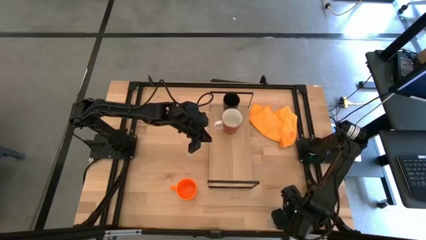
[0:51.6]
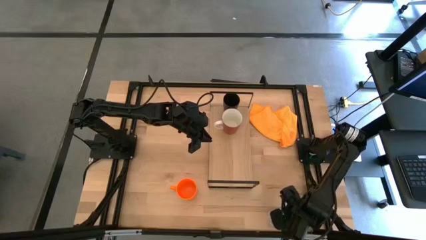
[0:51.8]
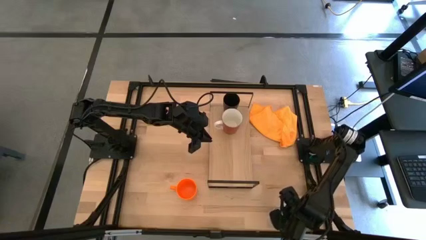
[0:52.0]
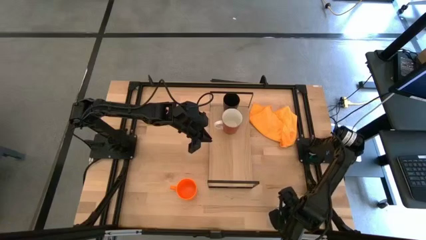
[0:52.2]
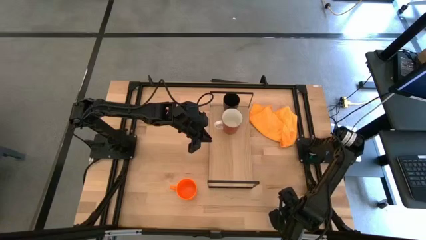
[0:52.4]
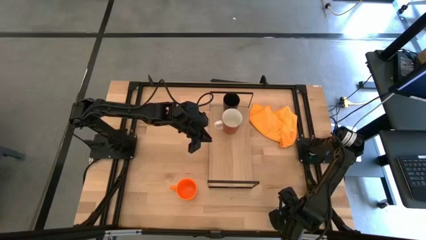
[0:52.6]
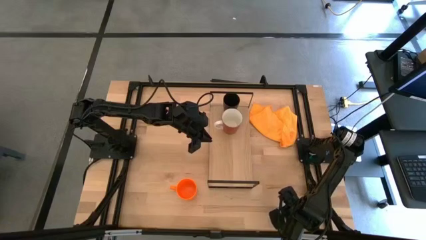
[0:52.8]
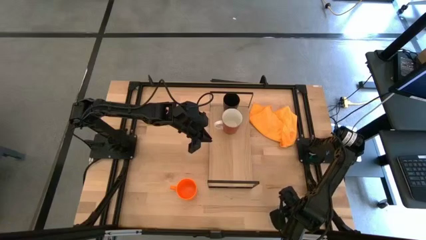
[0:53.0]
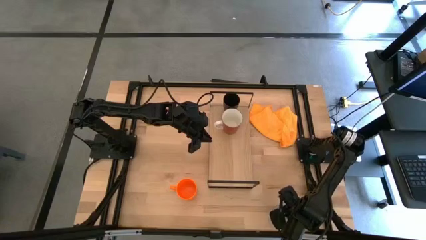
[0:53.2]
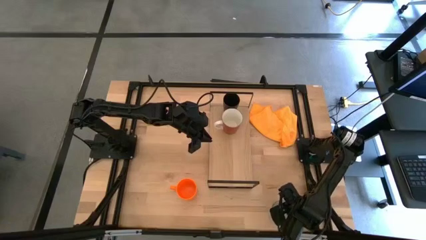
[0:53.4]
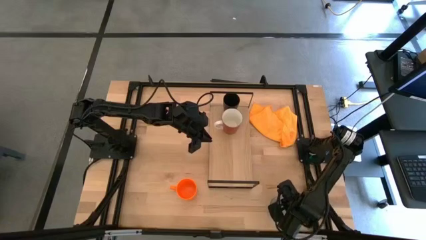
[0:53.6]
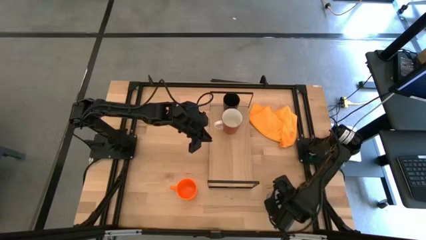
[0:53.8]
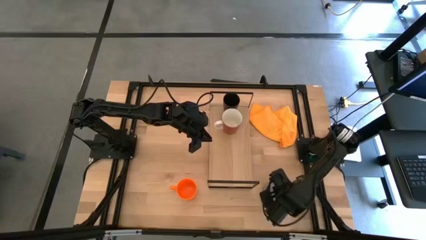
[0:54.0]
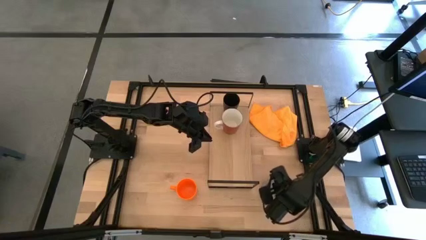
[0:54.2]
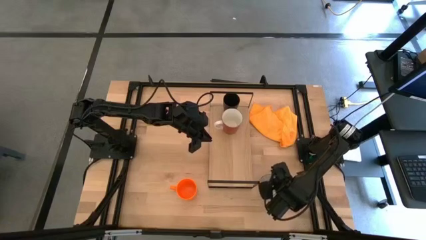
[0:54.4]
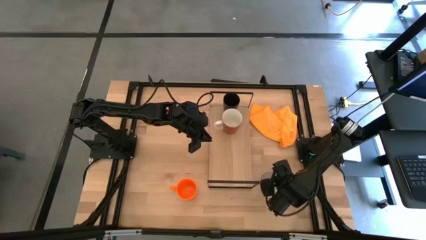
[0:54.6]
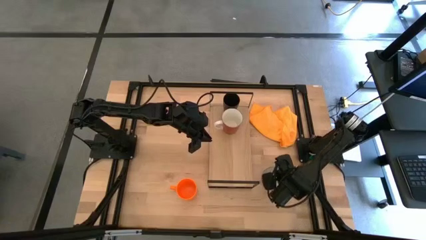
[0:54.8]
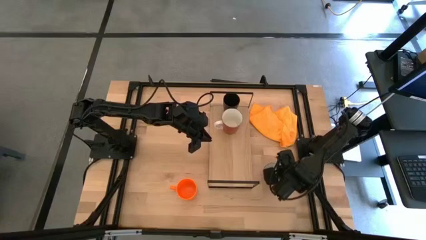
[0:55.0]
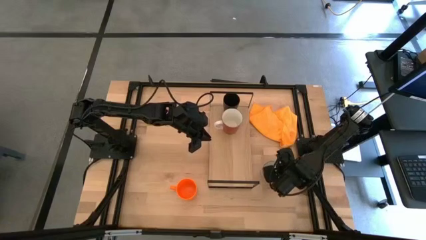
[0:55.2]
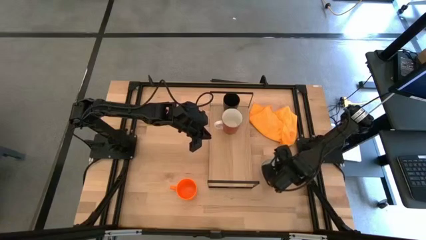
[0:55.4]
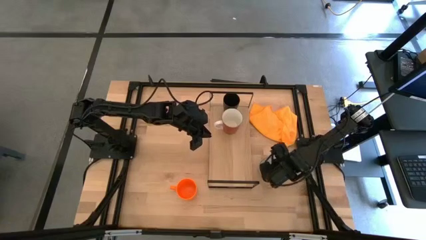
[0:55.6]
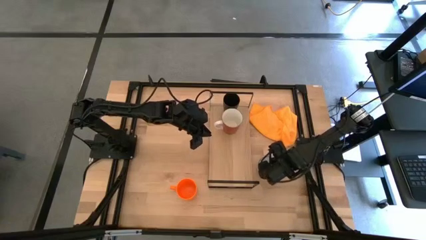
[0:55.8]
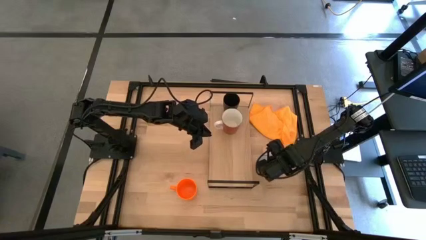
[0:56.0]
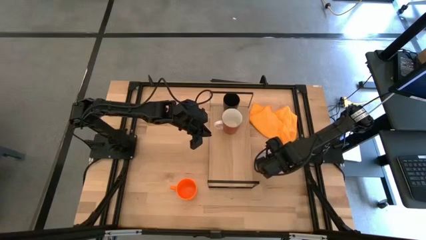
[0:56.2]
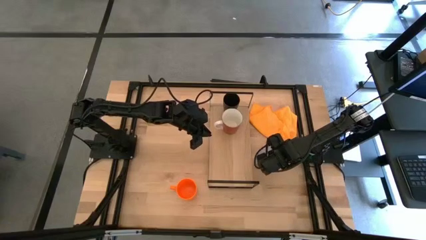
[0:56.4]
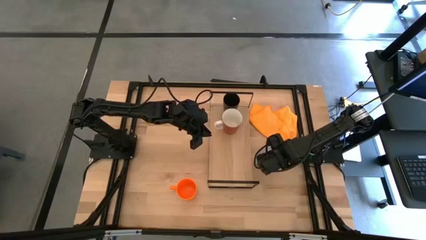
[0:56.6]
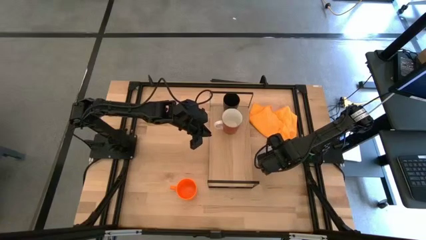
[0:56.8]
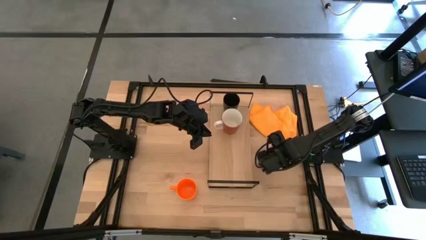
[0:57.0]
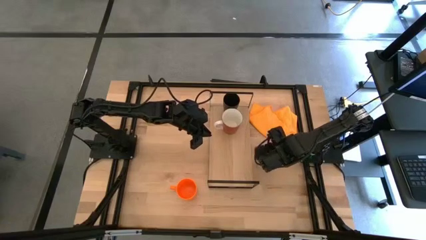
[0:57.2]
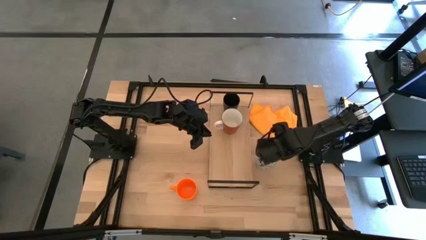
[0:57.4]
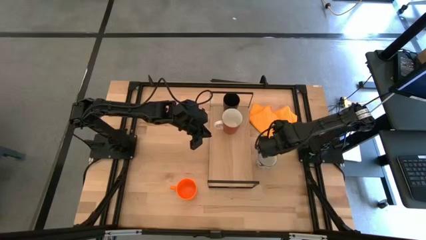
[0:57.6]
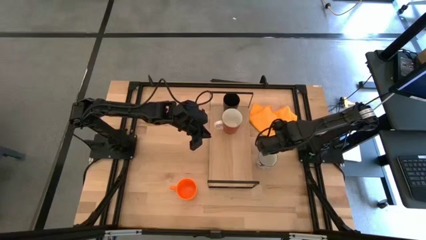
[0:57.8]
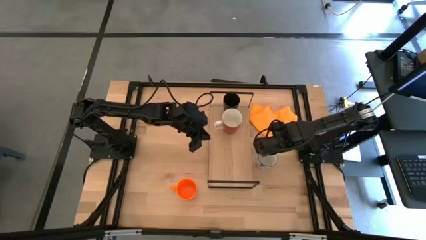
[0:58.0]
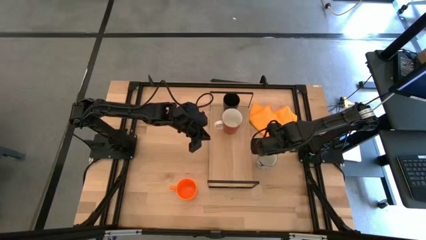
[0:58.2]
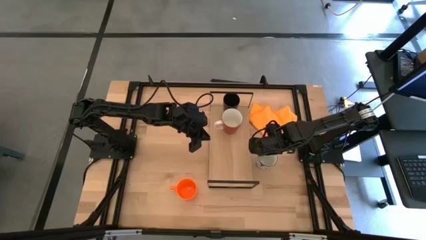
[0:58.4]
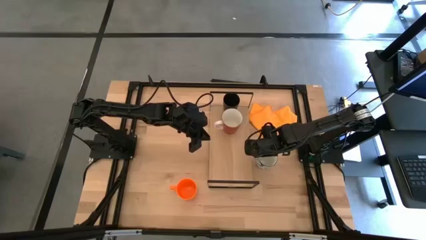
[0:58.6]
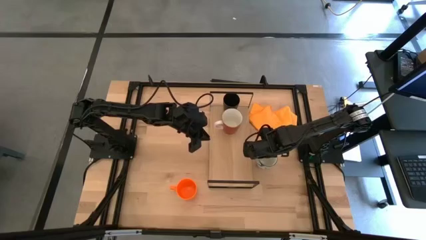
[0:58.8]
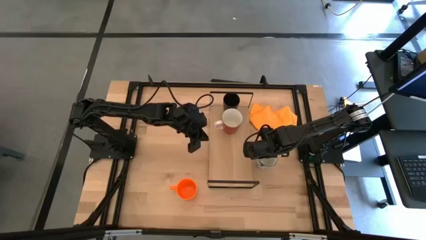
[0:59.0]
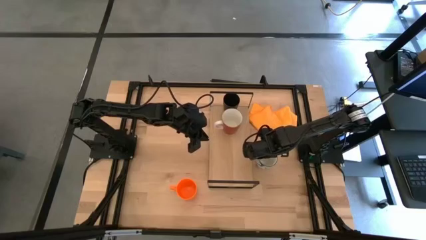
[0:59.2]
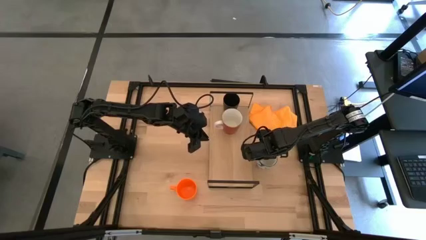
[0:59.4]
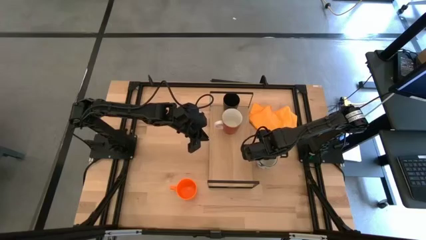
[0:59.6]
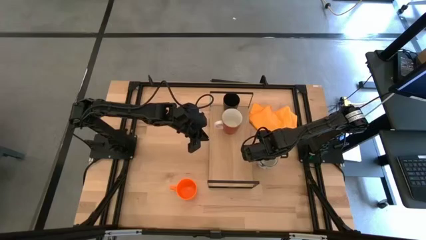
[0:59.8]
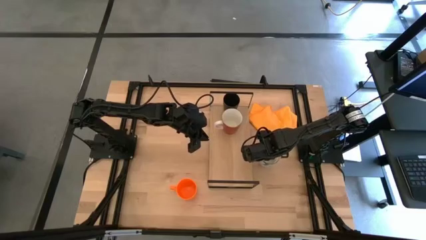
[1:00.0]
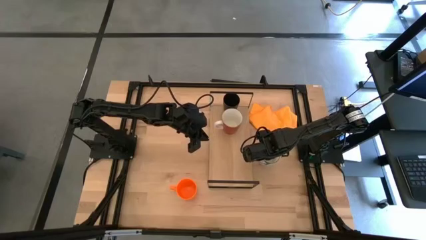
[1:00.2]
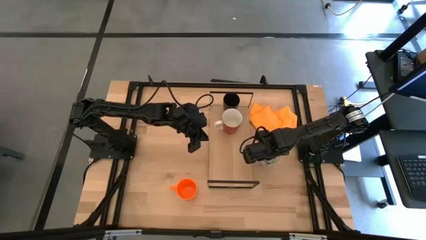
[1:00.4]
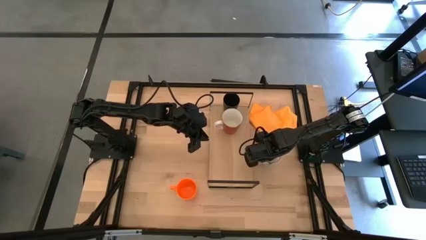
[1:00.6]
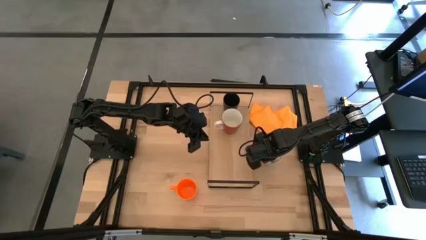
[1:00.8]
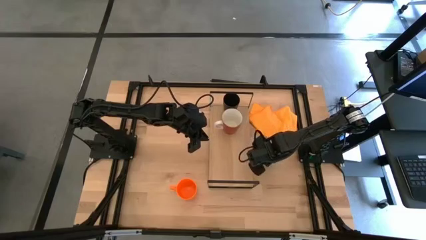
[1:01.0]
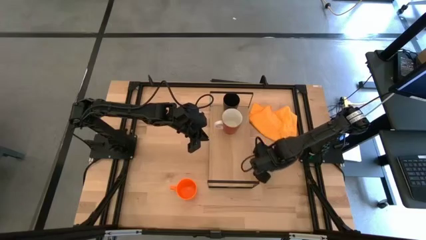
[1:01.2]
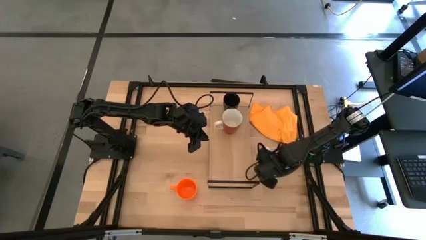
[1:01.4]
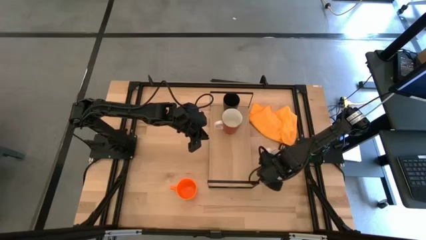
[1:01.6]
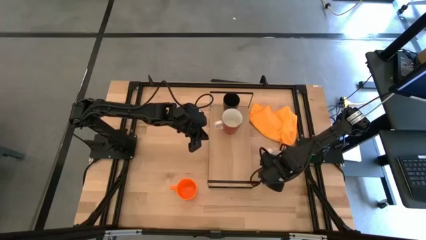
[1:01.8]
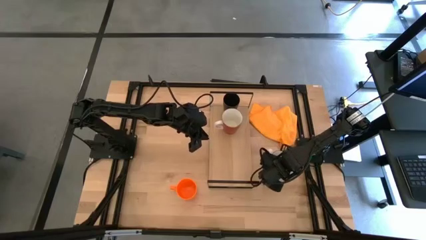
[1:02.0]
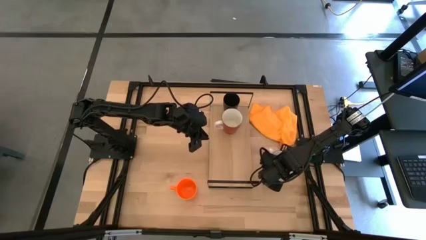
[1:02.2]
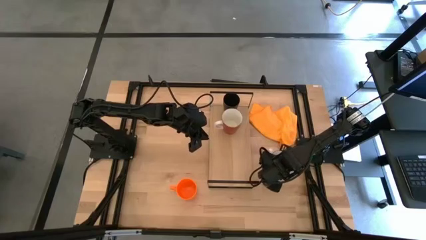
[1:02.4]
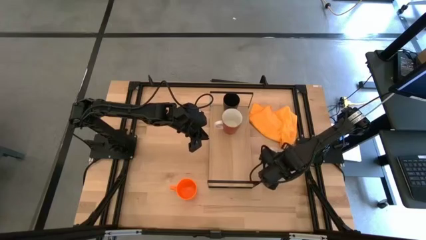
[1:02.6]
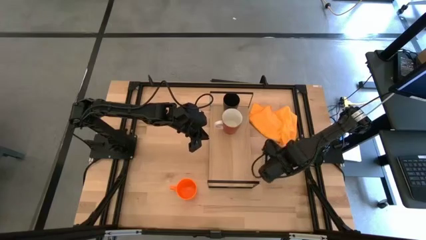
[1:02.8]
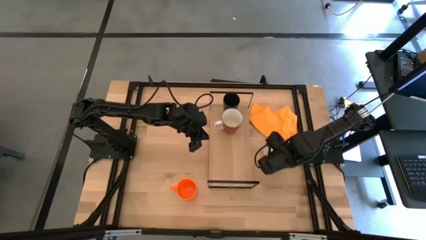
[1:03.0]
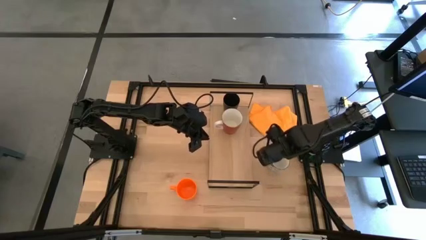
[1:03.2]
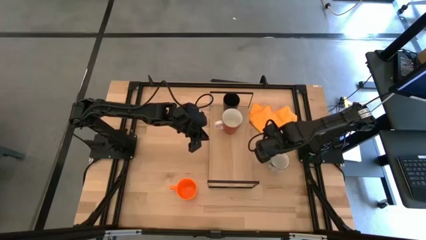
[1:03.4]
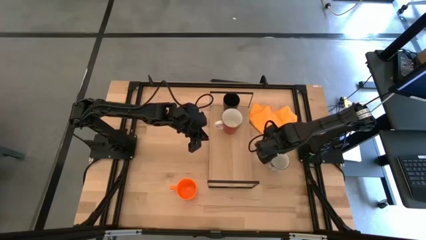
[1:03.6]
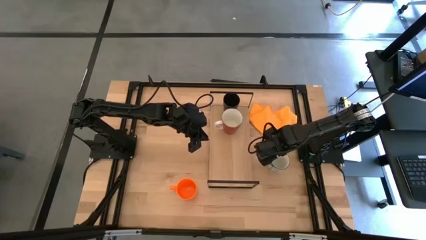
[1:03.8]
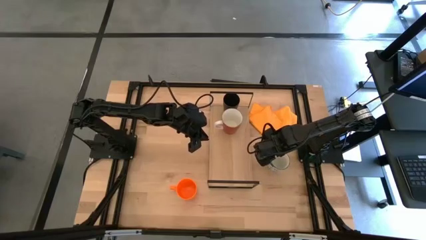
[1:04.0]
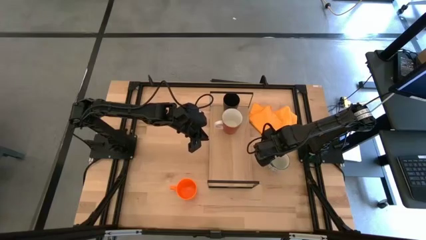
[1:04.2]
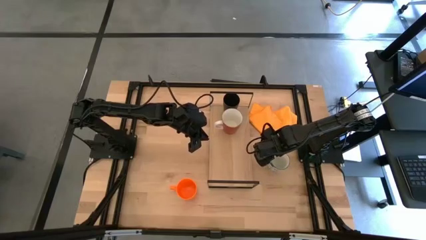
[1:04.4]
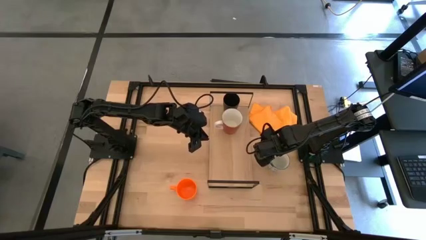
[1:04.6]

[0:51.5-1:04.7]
Task: Stack small to large cups/mugs on shelf
Put the blue pattern mug align with the red pattern cup on the shelf

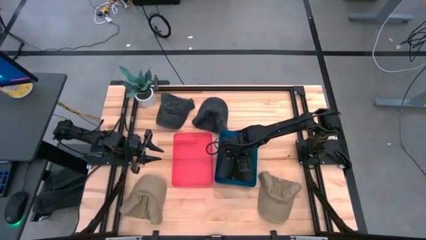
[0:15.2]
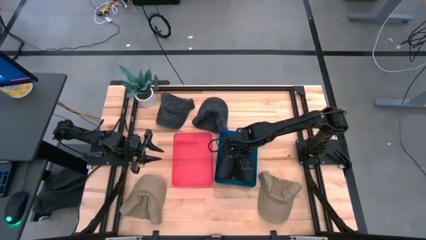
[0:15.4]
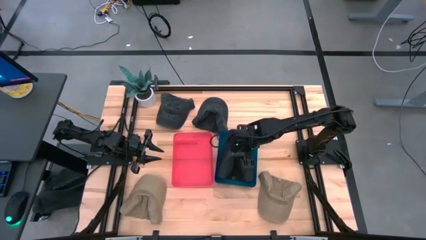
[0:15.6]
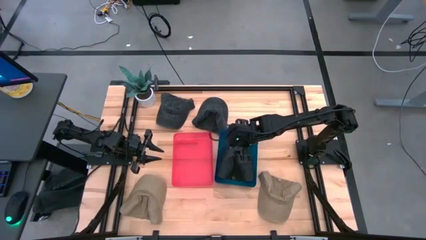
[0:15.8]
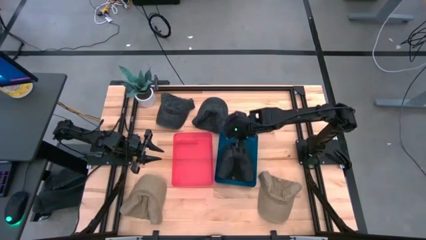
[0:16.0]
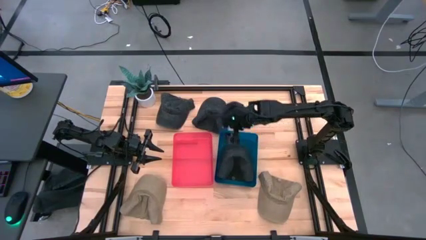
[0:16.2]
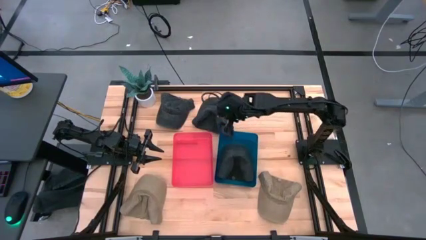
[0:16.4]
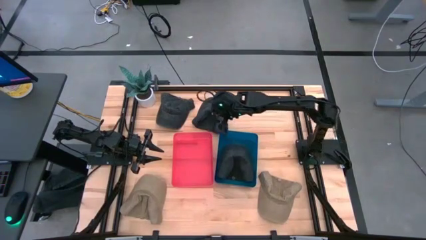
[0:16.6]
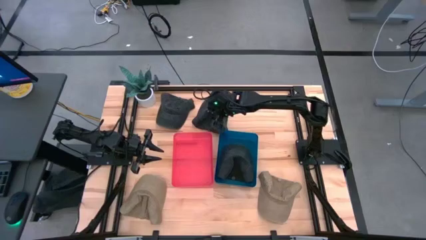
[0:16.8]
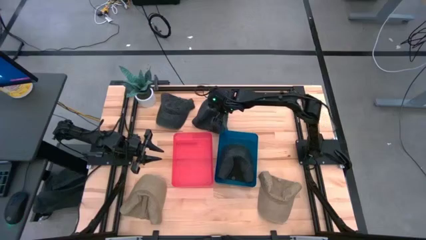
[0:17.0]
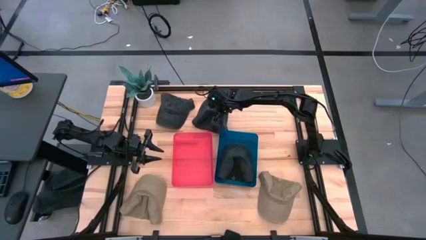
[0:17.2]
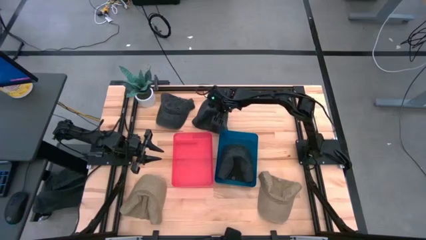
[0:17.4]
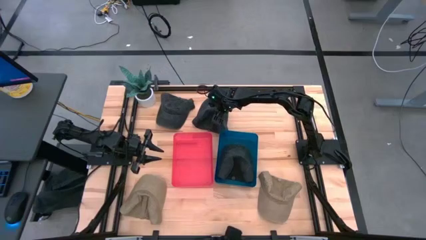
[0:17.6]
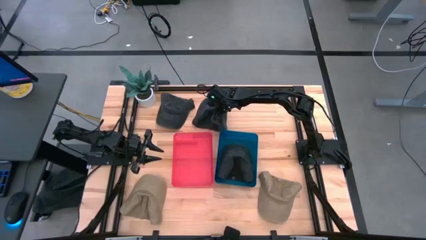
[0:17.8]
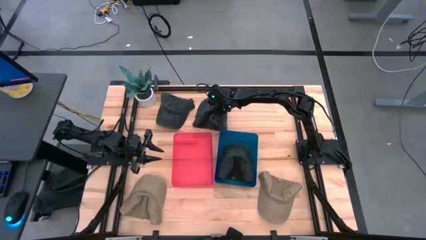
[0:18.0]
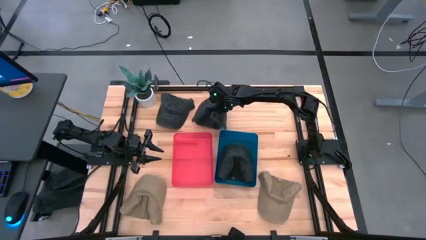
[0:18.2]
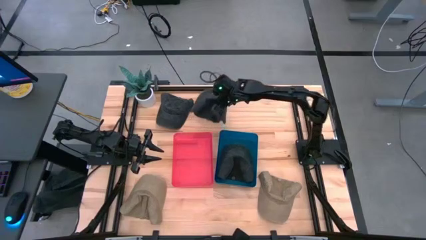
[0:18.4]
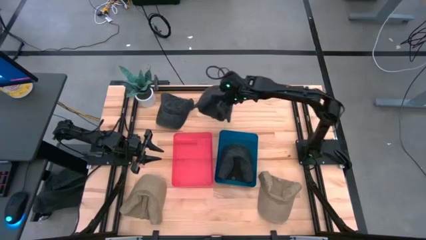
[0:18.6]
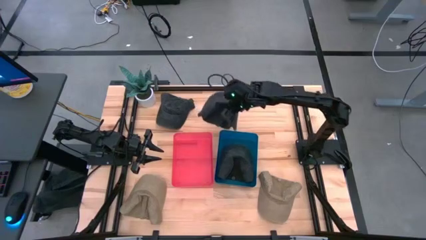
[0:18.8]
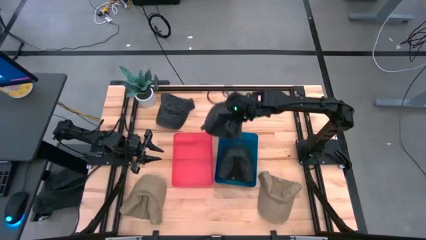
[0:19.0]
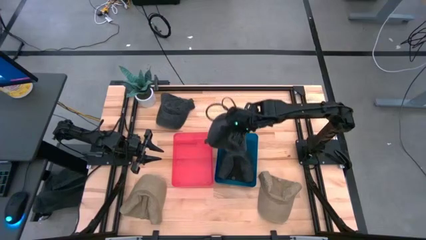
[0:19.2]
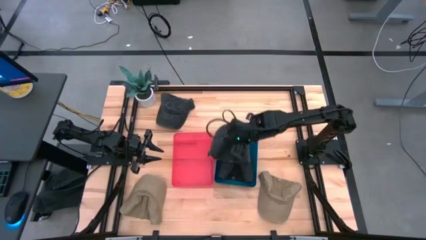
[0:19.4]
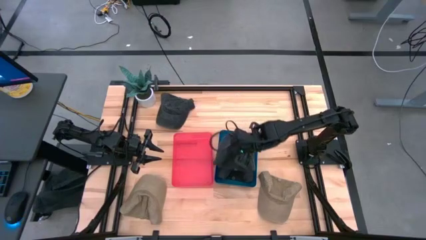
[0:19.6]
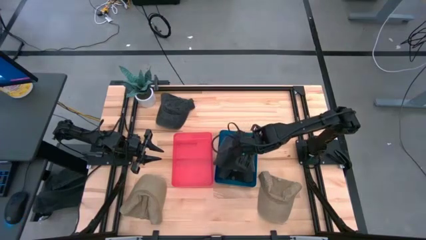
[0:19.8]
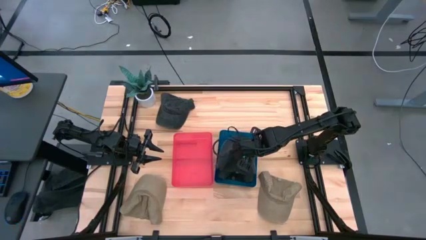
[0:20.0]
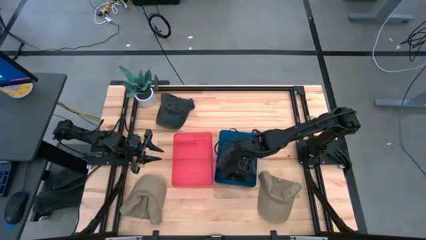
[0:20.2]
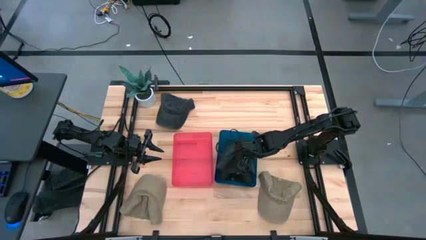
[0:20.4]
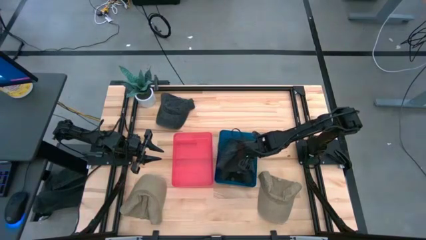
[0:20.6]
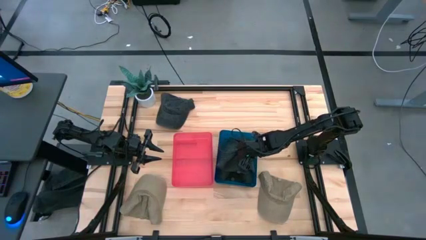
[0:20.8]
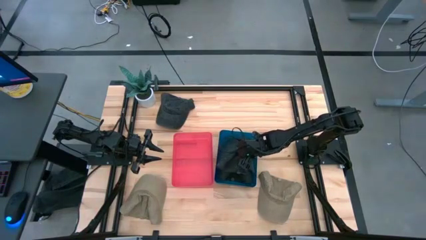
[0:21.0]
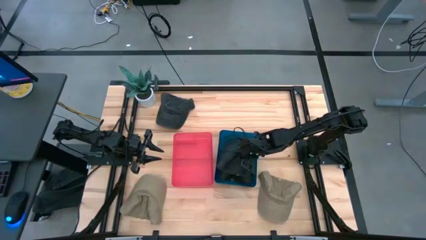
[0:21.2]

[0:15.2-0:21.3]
Task: Pick & Place hat
Put the right black cap into the blue bin
